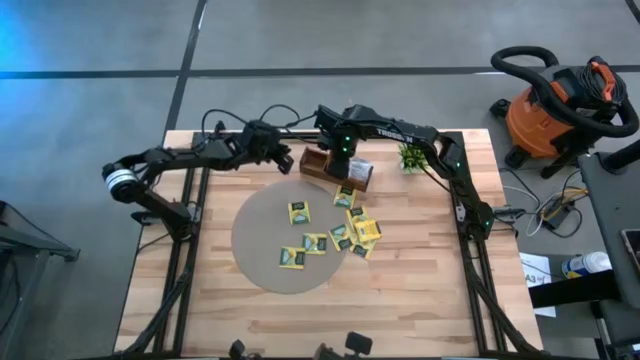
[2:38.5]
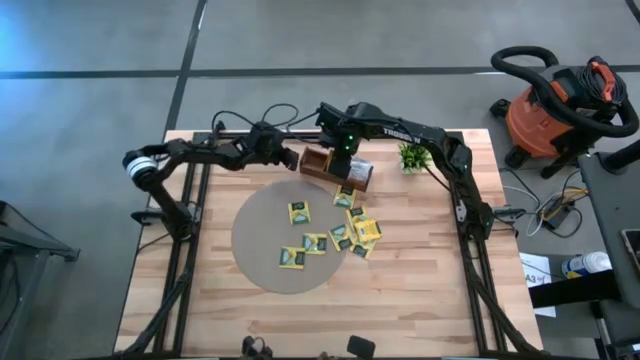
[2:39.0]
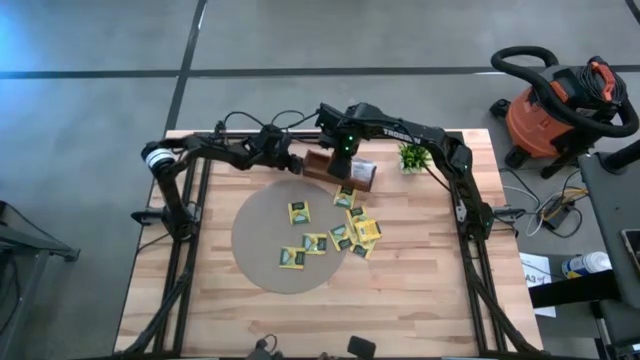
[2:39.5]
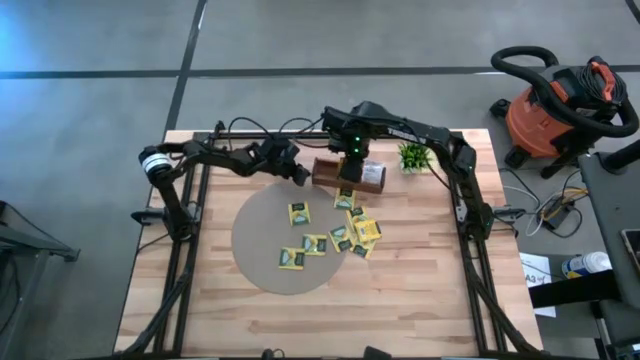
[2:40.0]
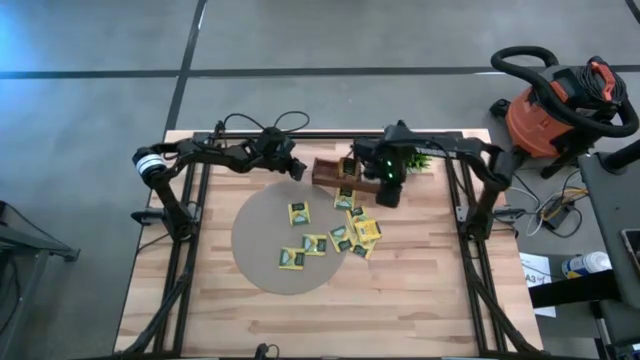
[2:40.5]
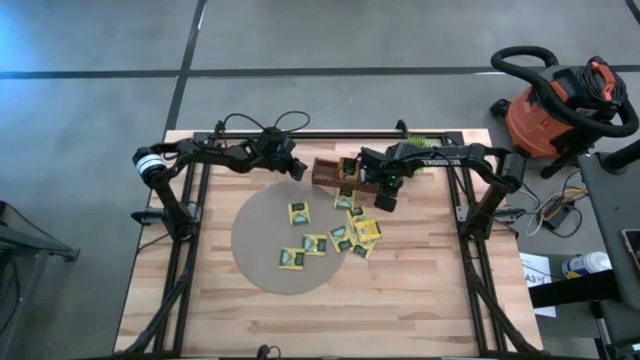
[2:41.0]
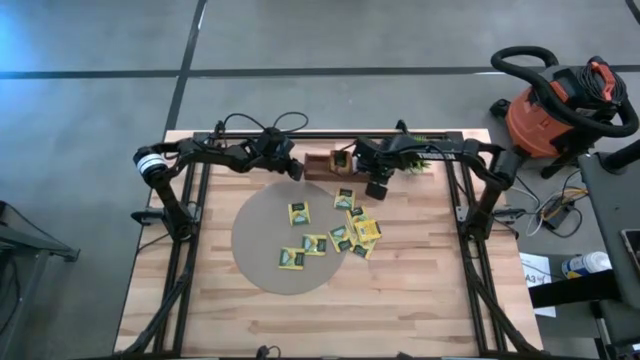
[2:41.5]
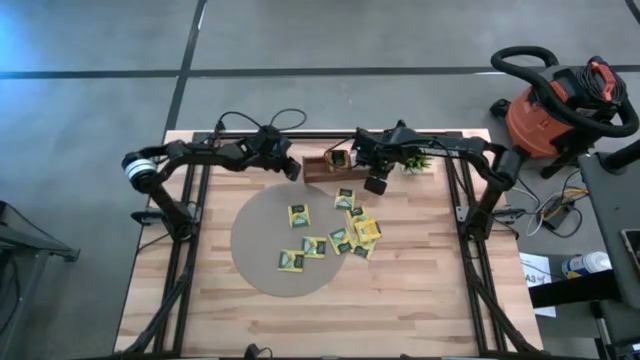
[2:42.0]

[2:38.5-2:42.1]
Task: Pick & Place Tea
Adjust the wooden organizer

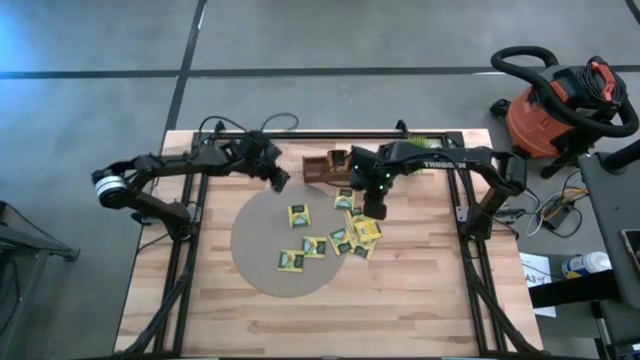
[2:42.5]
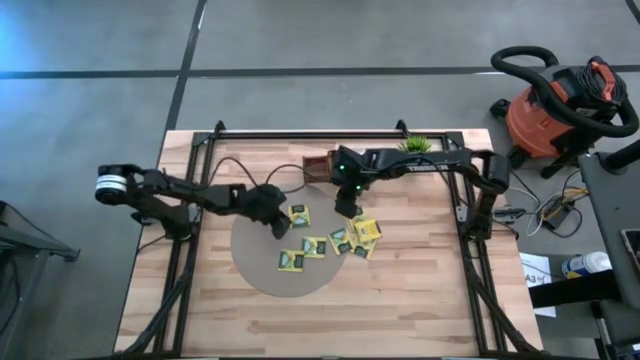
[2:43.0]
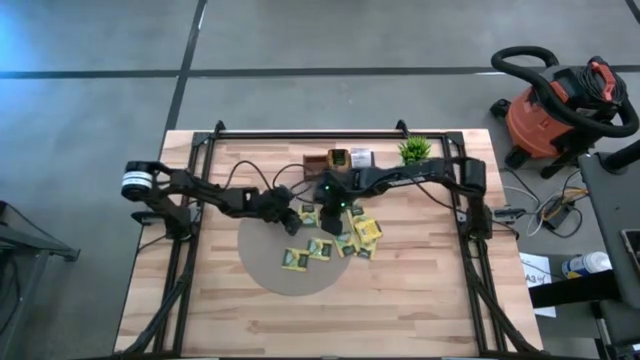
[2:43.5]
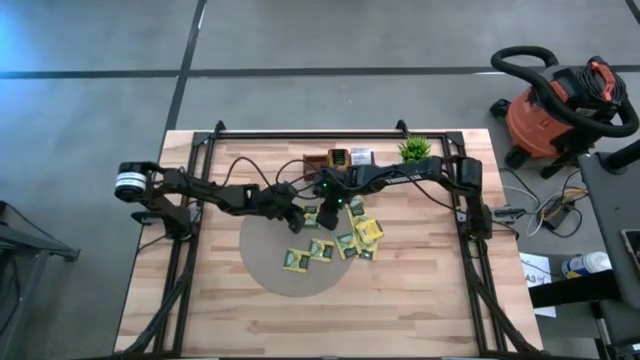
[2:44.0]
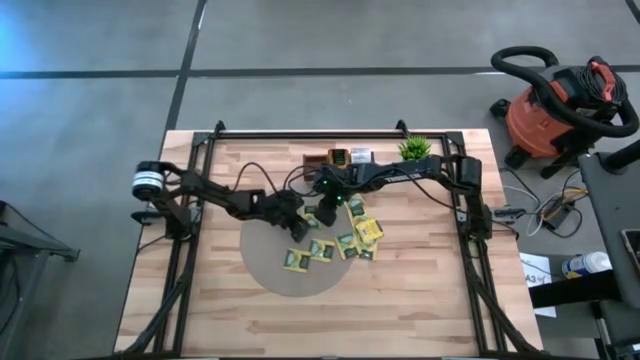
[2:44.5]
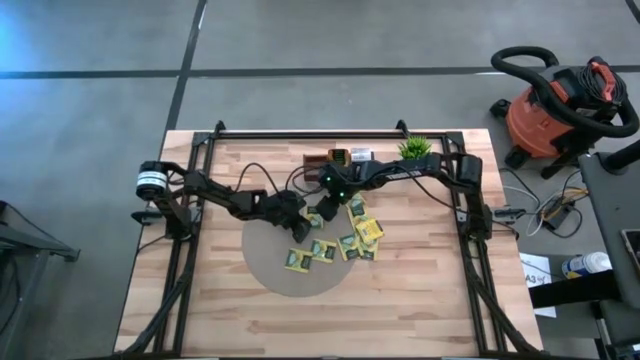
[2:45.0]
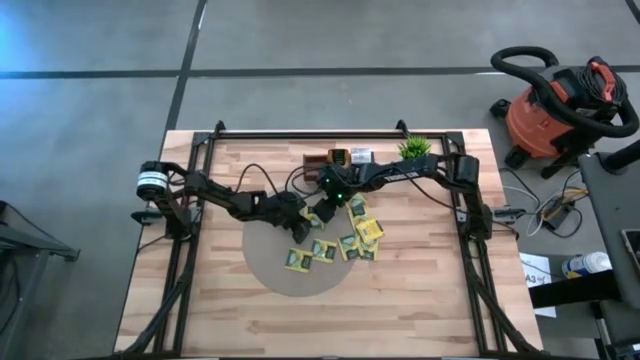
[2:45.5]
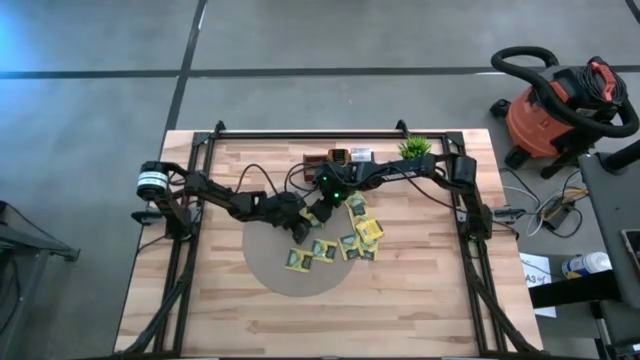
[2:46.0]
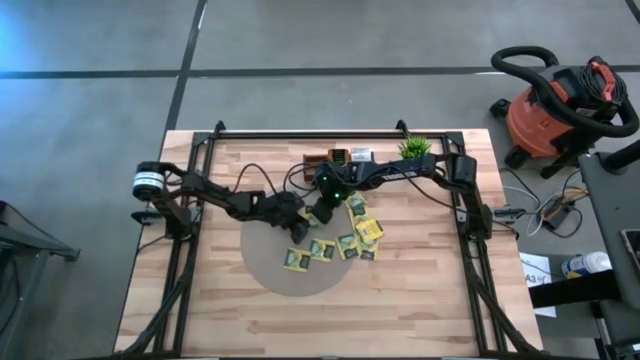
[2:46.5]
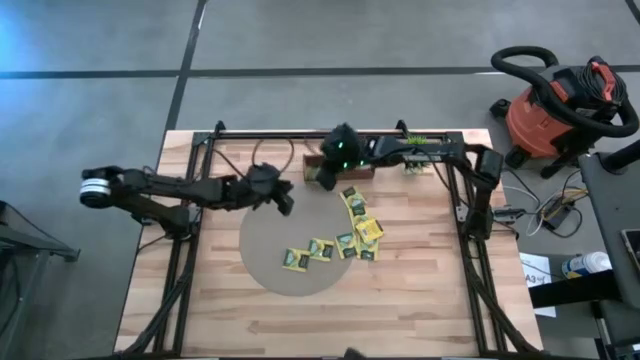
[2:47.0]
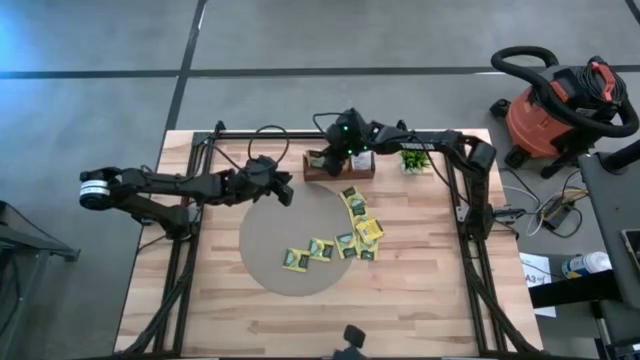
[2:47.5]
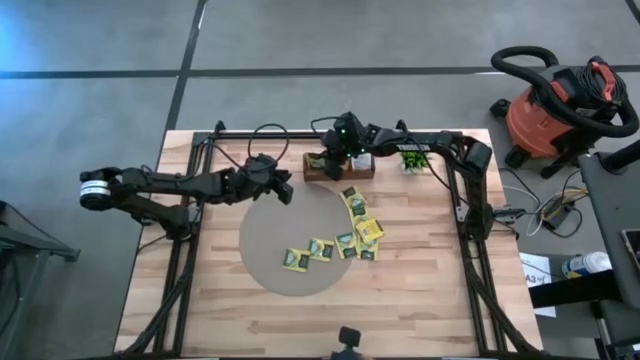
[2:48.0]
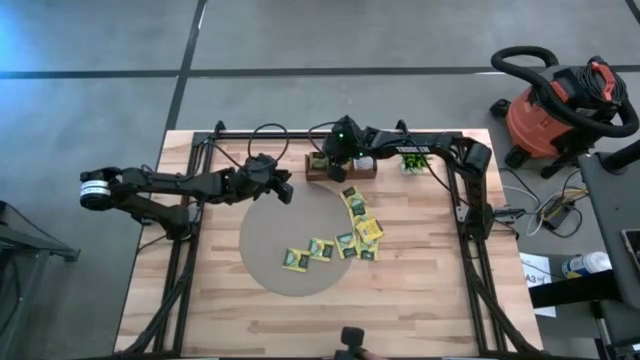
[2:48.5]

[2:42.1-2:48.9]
Put the yellow tea sachet into the left compartment of the wooden organizer

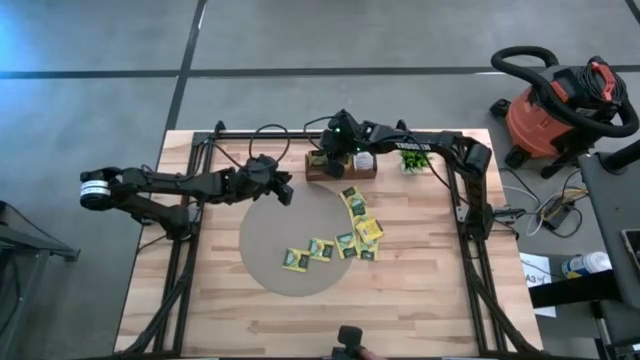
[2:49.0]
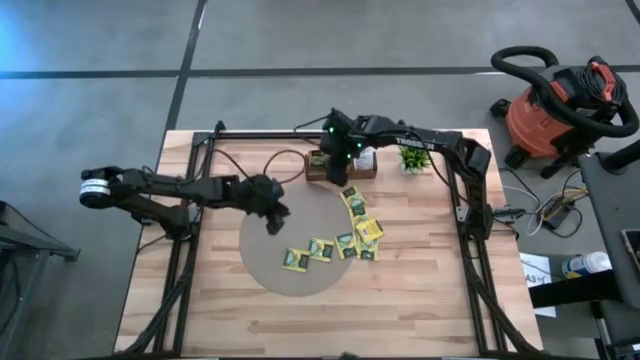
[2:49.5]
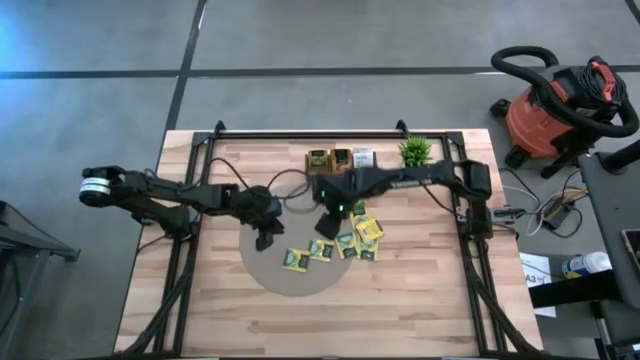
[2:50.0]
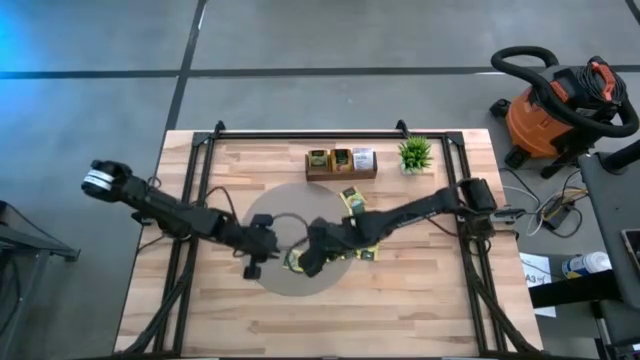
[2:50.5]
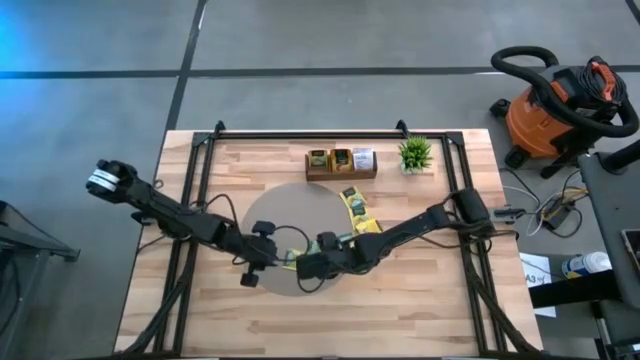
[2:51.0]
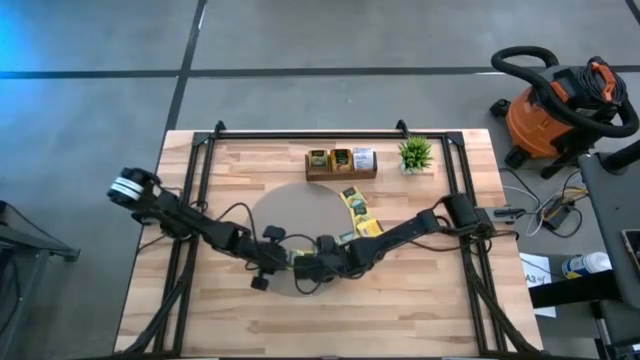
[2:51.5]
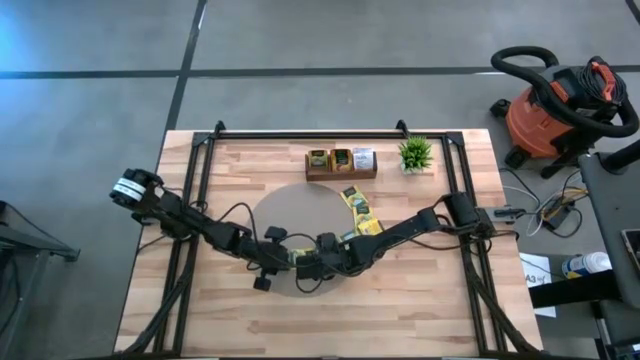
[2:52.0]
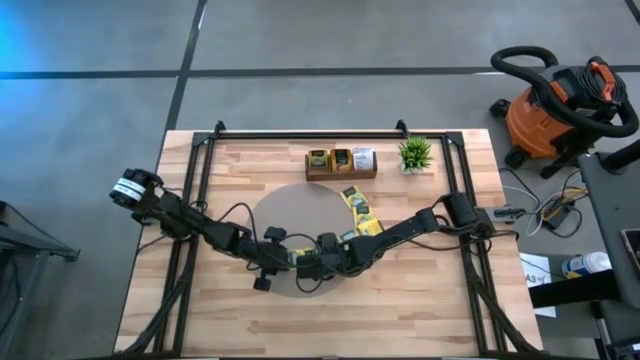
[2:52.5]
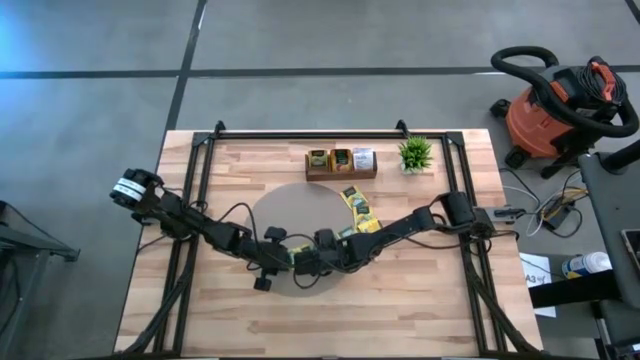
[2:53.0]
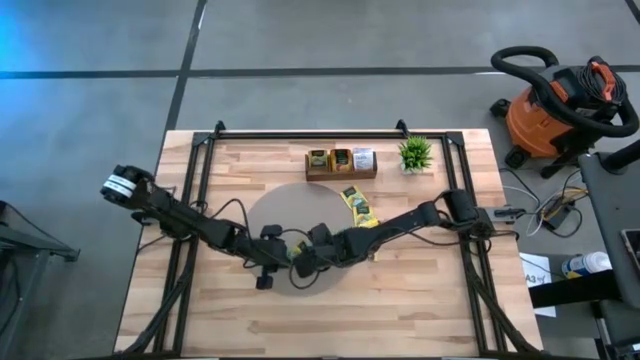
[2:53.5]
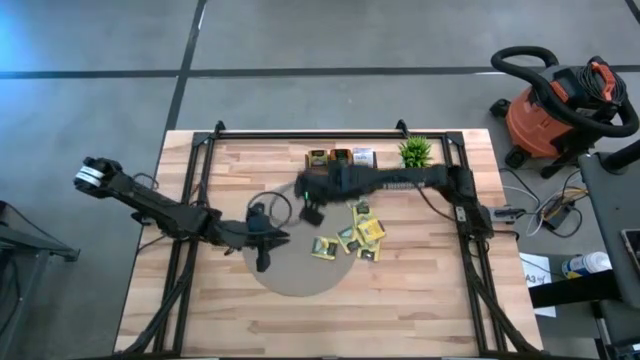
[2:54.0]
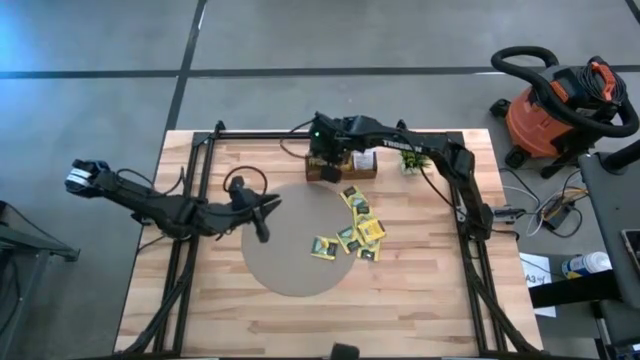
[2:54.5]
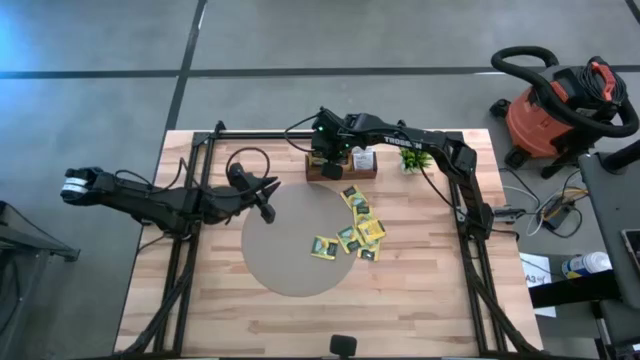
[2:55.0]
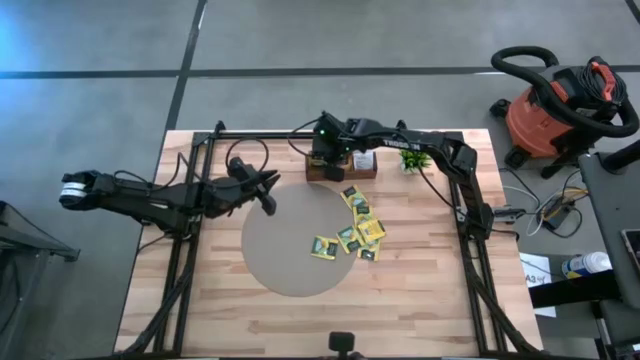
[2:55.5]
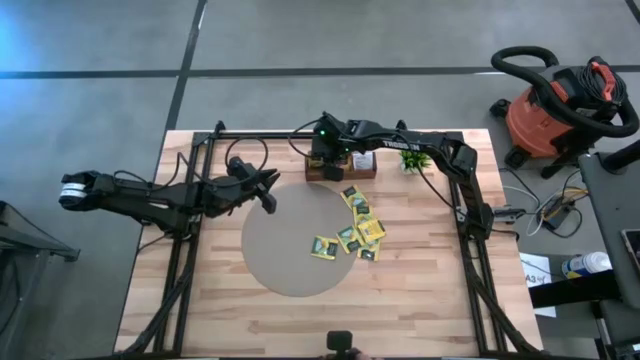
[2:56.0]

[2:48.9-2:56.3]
Put the yellow tea sachet into the left compartment of the wooden organizer

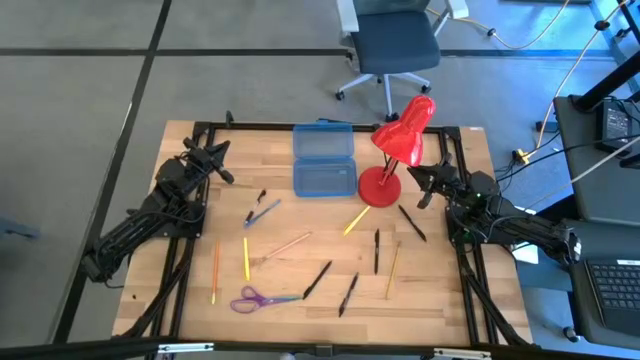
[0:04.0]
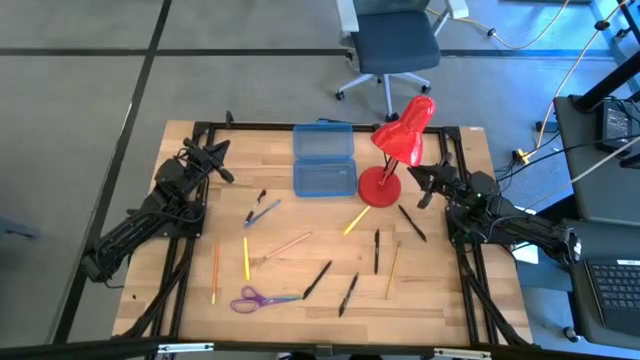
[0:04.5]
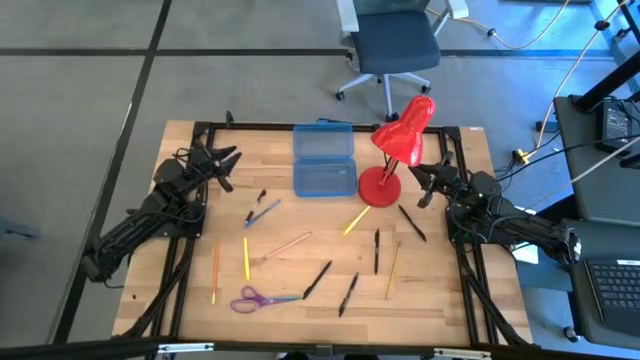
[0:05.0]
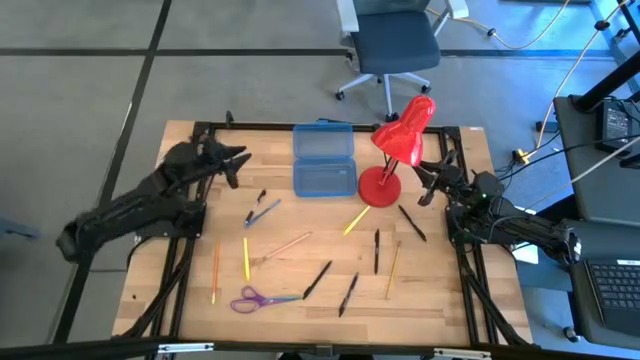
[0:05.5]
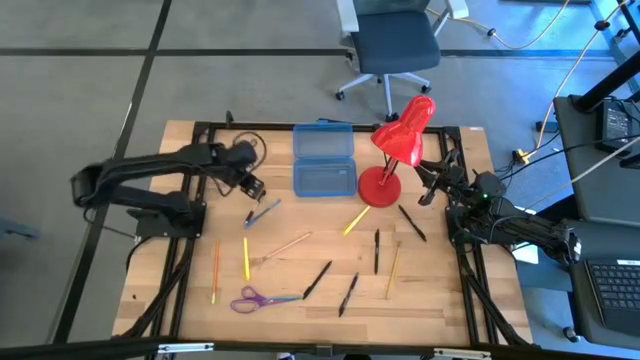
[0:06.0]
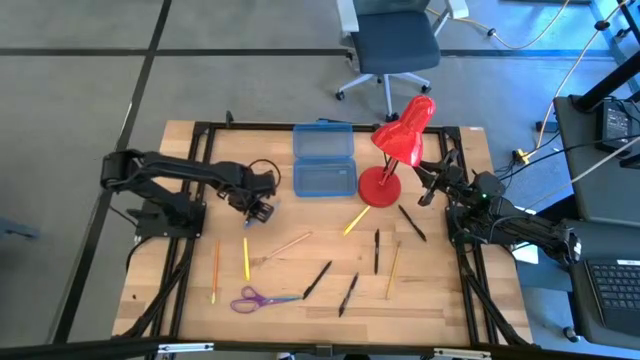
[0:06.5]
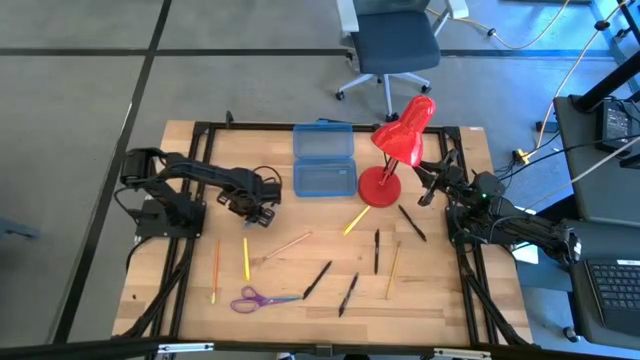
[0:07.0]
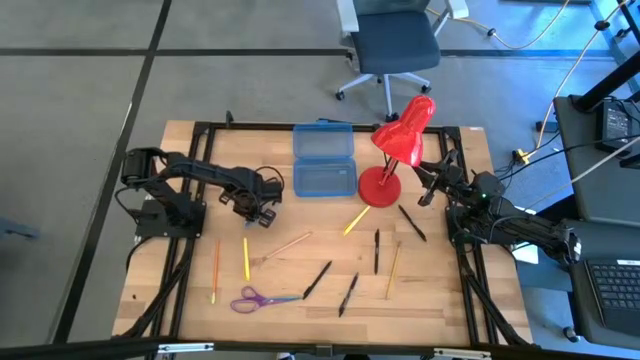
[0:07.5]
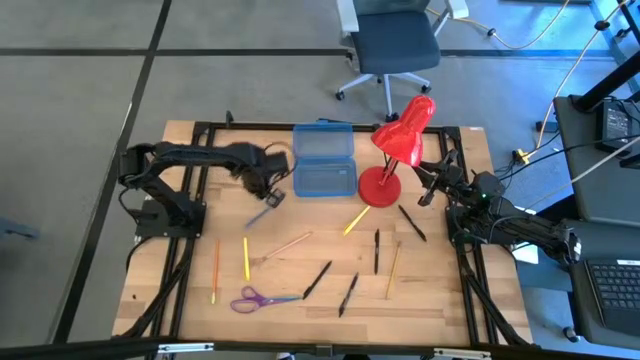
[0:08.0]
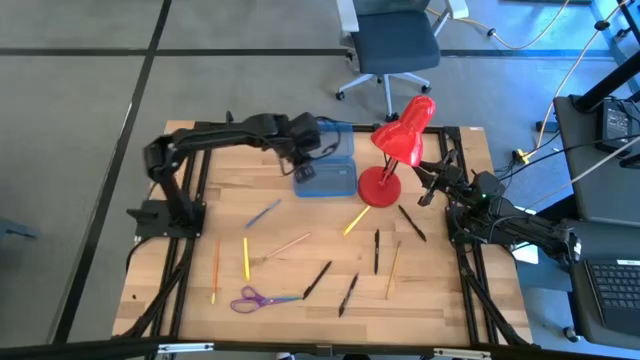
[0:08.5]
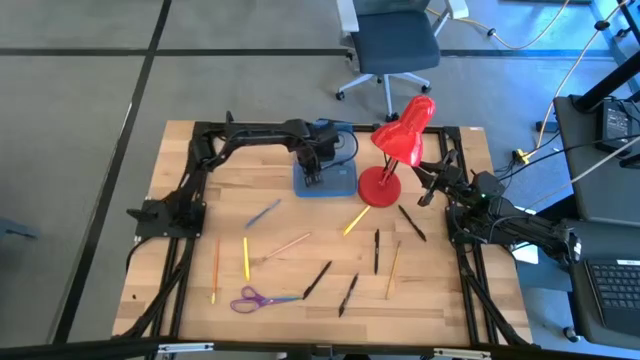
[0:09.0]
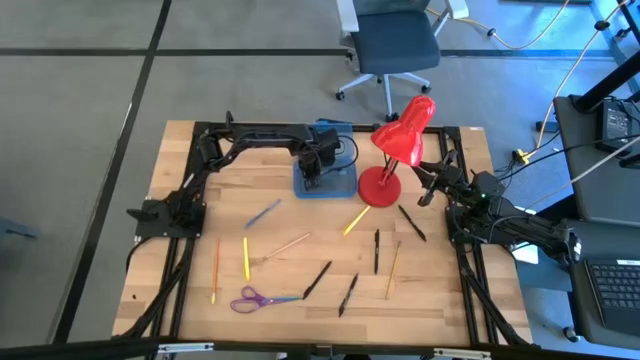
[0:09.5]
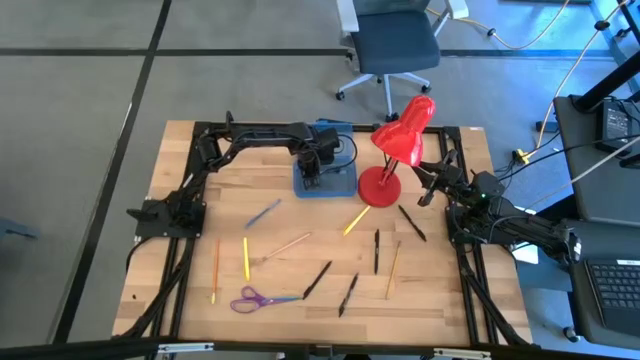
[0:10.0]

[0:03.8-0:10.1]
Task: Pick & place school supplies into a supply box
Put the black pen into the blue supply box
